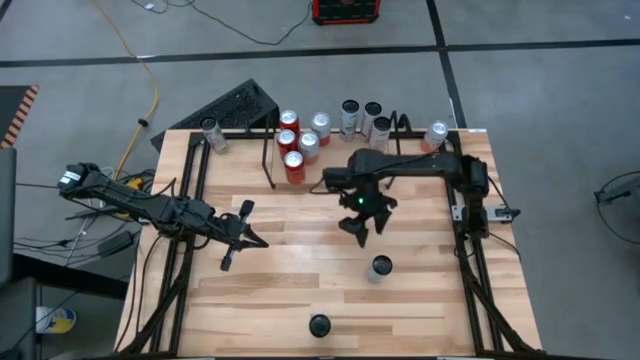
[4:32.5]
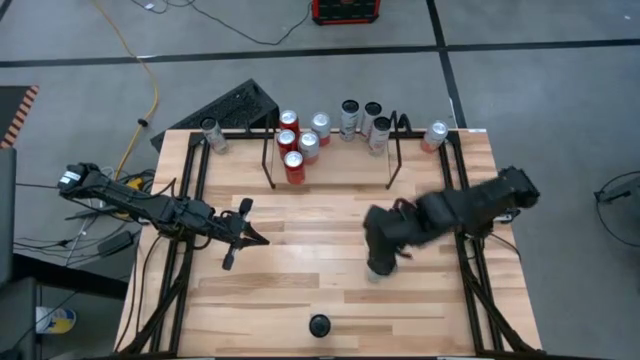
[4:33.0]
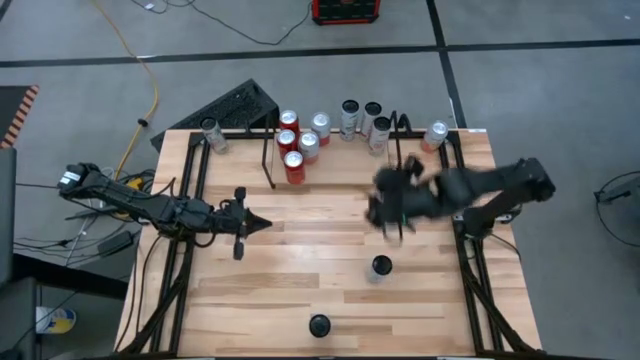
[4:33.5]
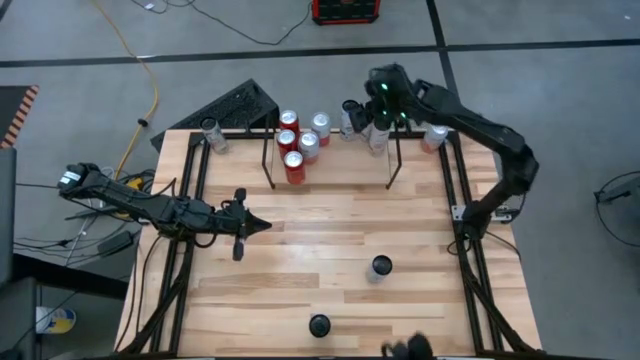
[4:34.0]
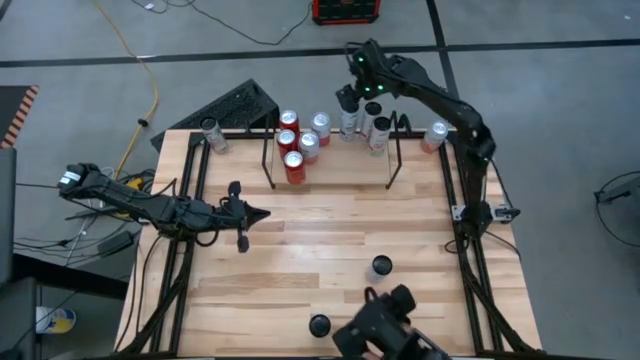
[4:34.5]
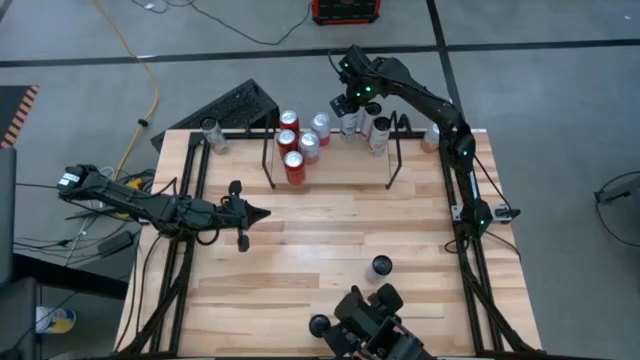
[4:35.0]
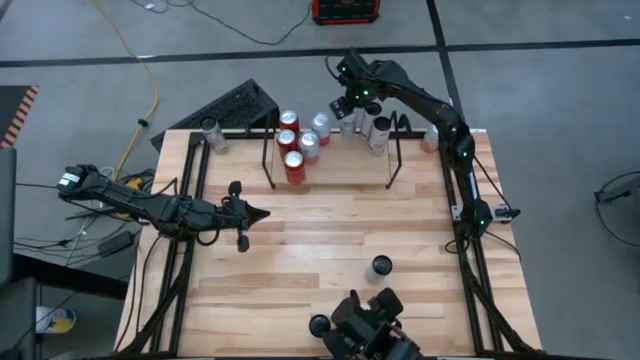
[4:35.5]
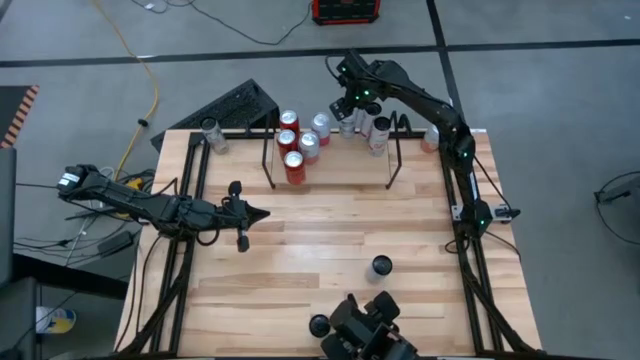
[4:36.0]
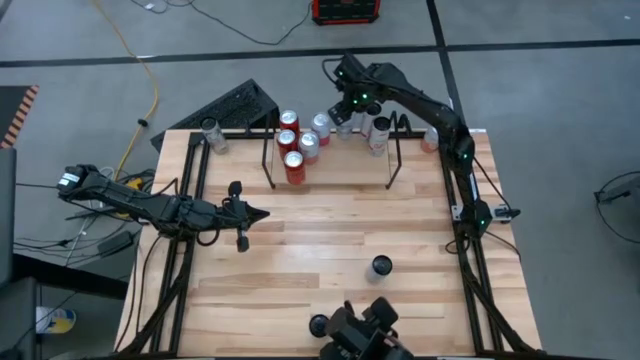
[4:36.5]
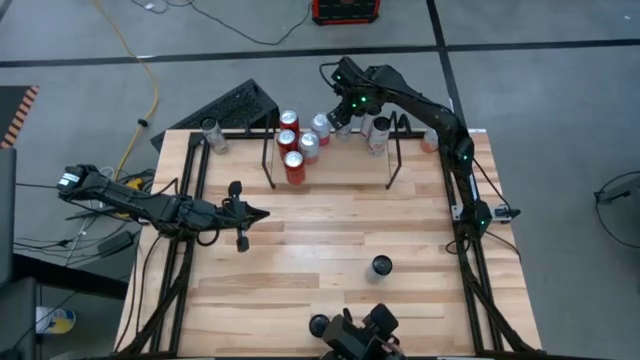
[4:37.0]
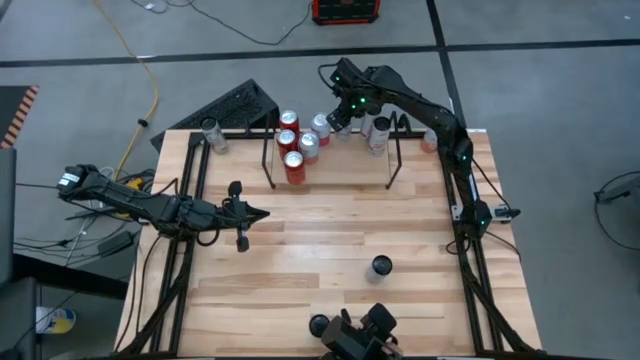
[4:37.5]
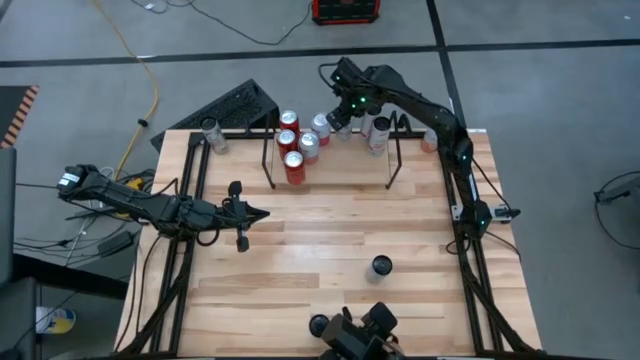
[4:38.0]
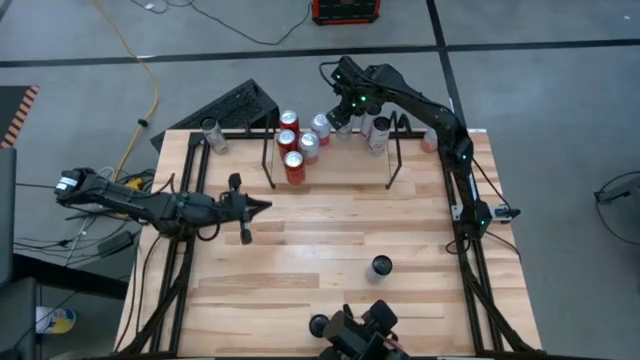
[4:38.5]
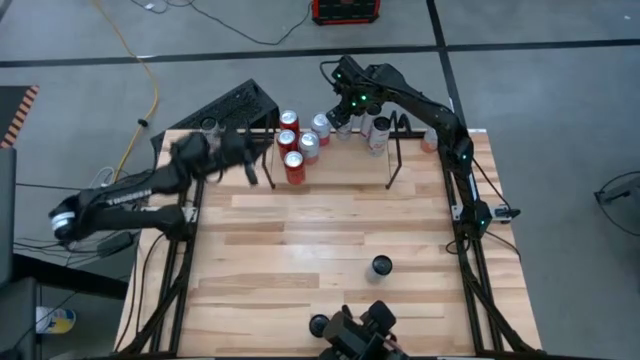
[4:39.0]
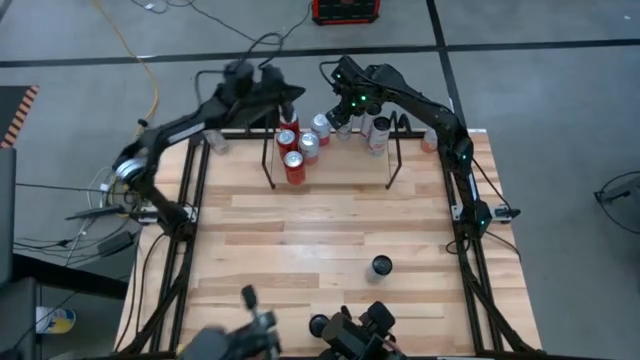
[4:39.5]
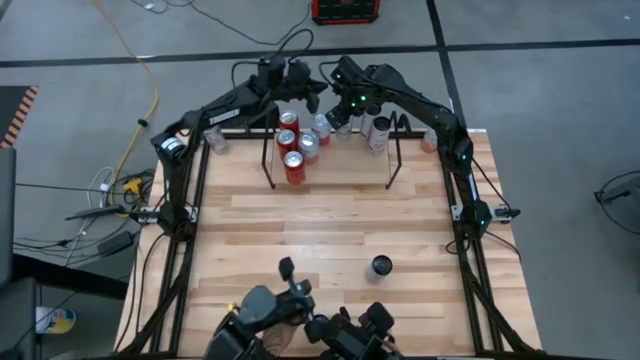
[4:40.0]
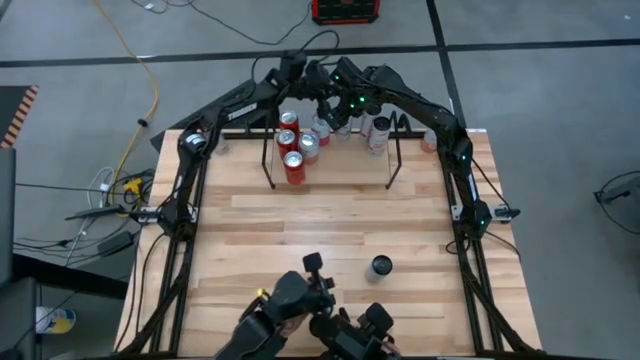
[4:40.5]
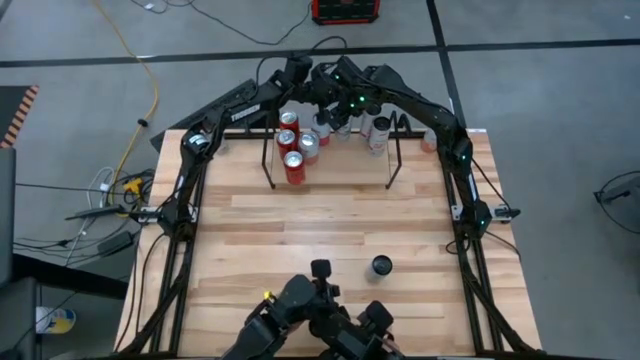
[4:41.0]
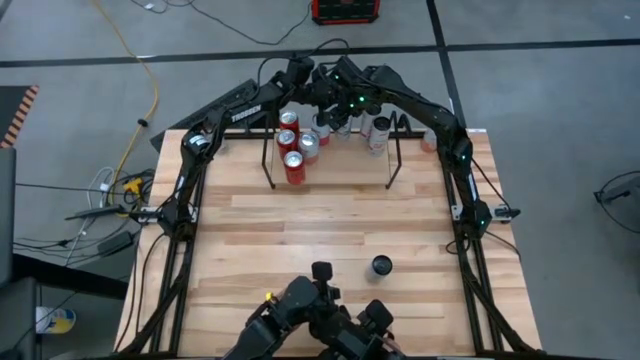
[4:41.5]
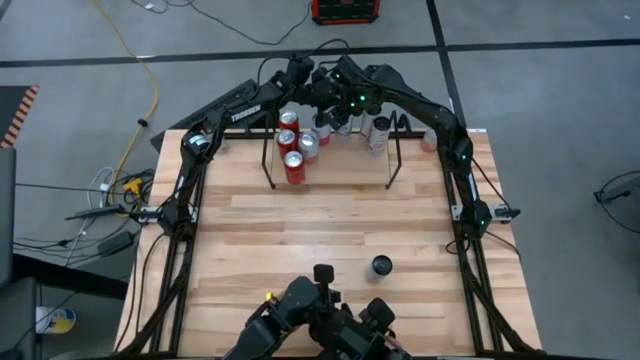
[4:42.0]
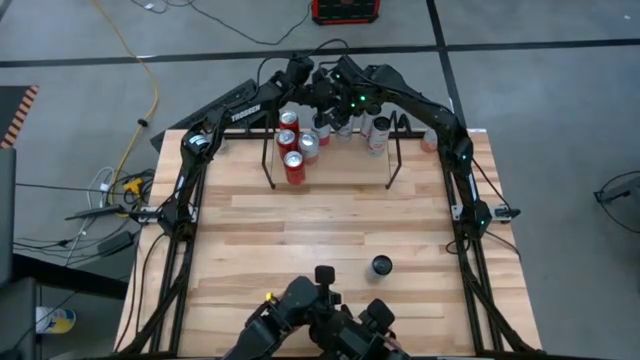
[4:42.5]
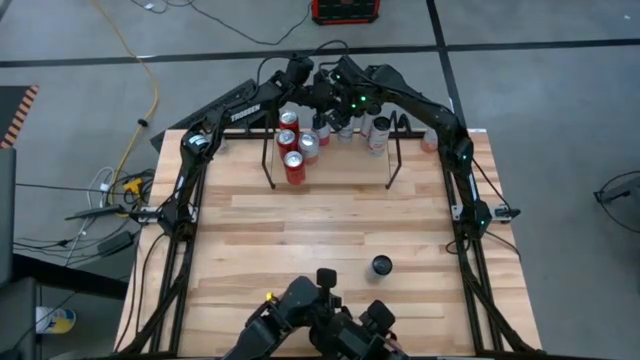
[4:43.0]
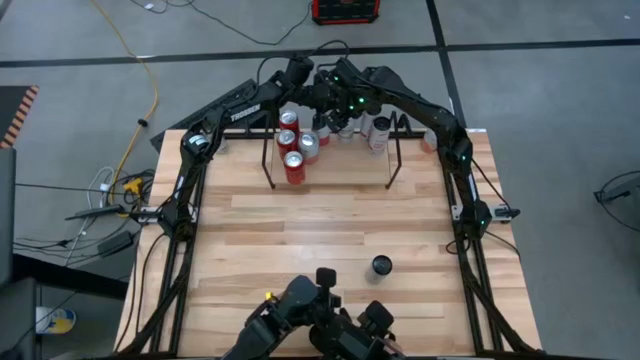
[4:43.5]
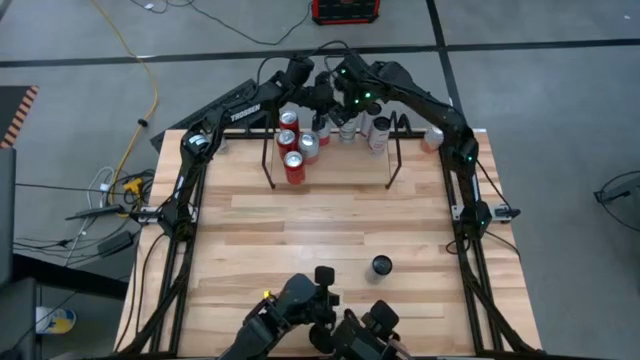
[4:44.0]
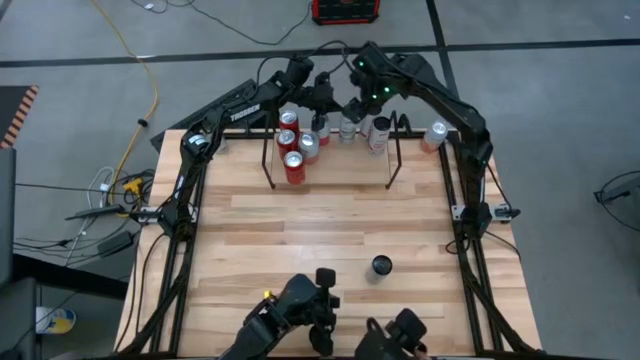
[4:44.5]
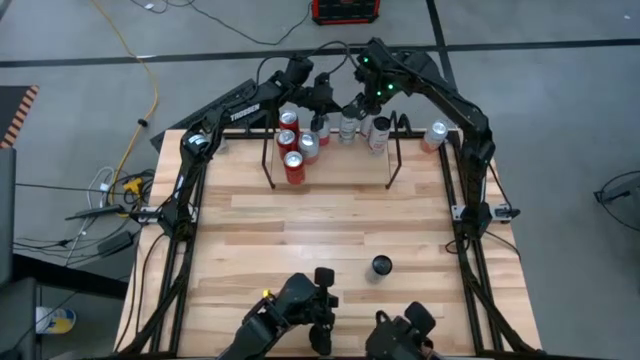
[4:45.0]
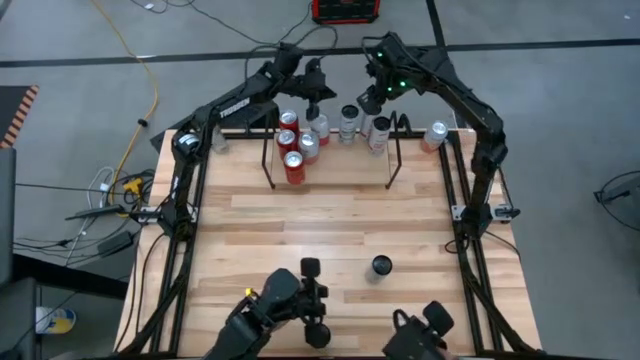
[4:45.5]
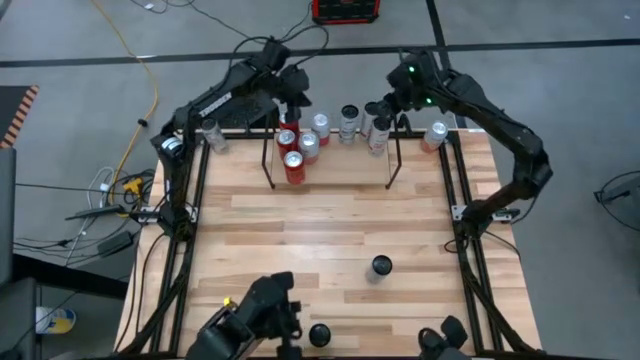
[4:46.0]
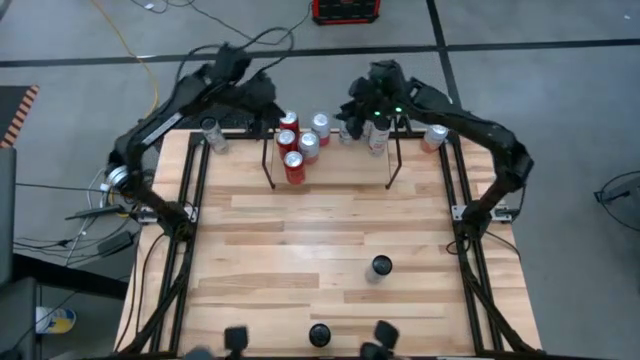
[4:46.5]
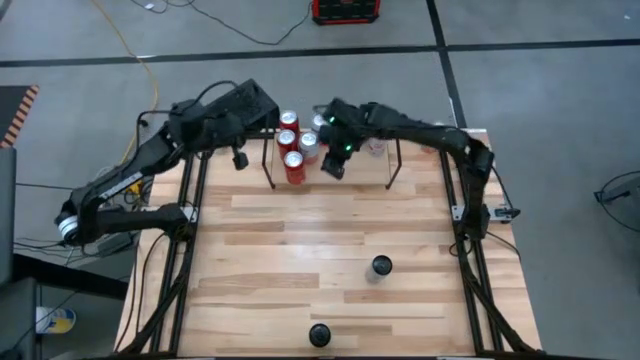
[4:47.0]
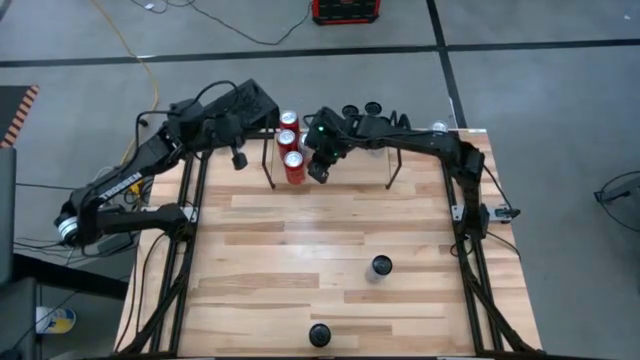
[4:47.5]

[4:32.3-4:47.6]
Task: Place canned beverage on shelf
Adjust the soda cans on the shelf
